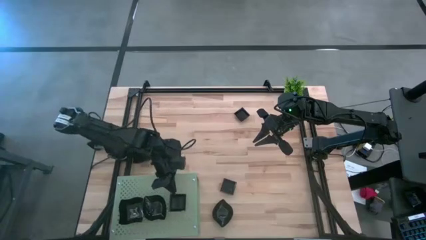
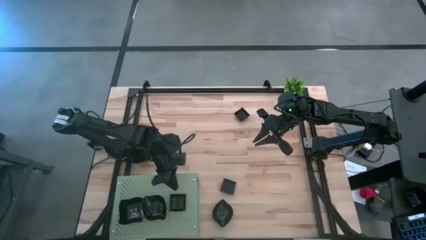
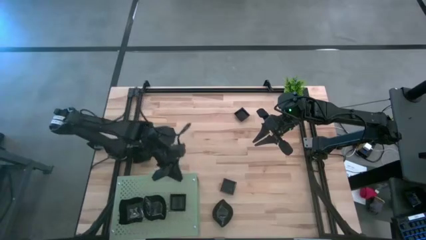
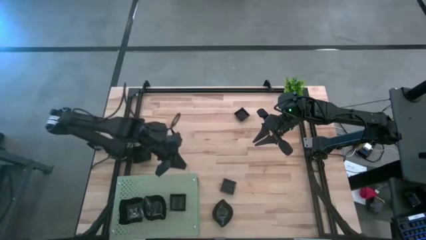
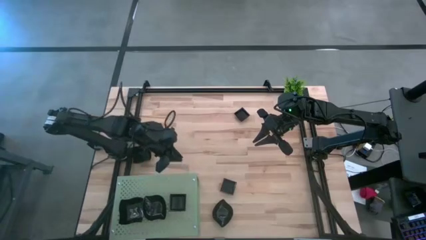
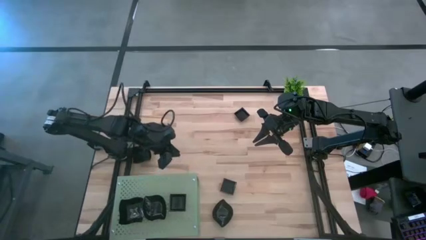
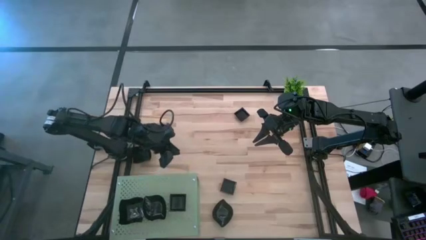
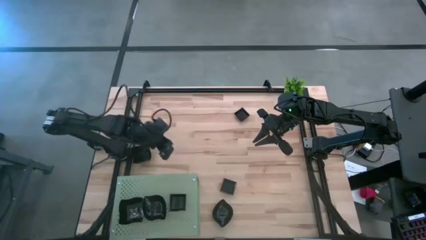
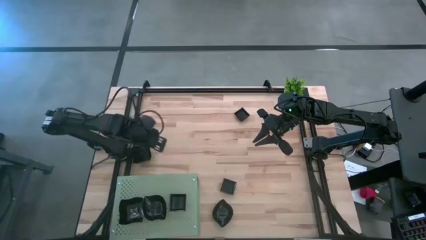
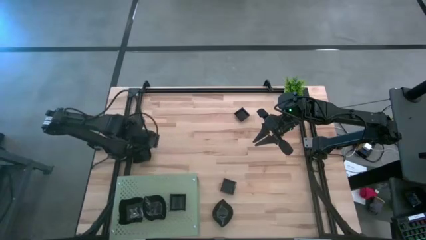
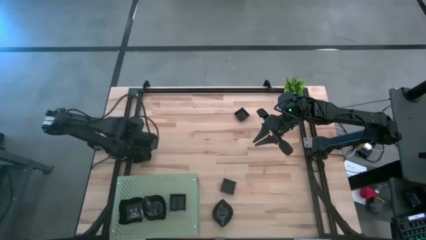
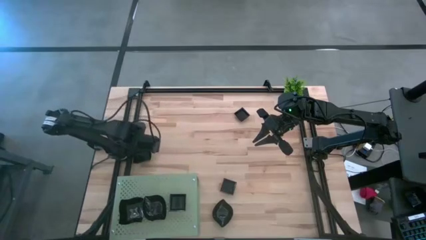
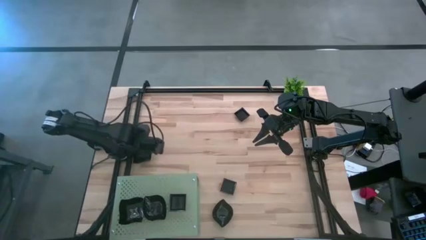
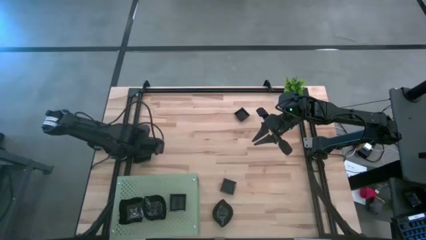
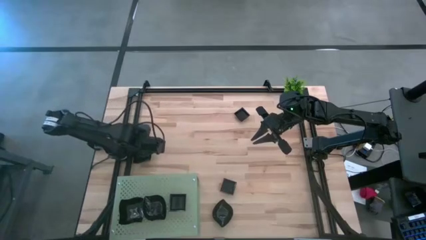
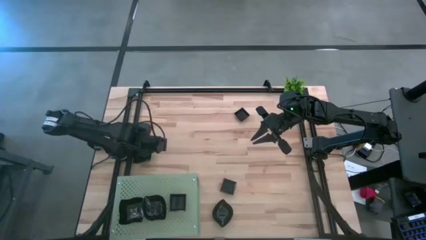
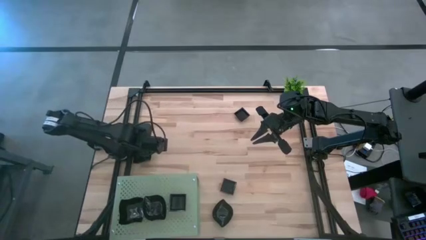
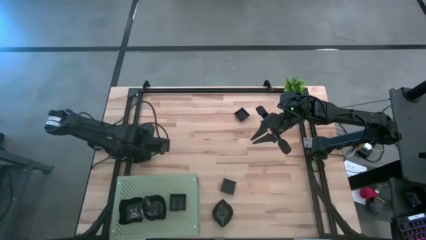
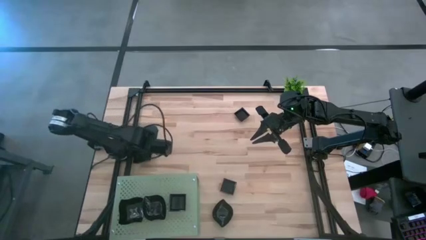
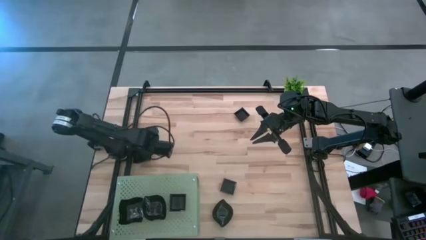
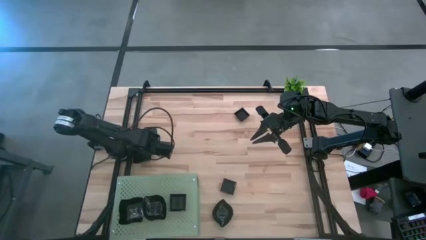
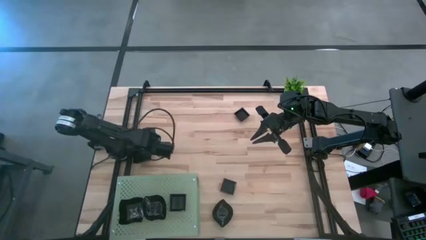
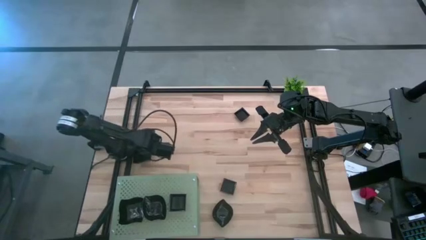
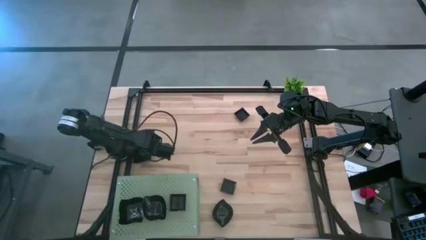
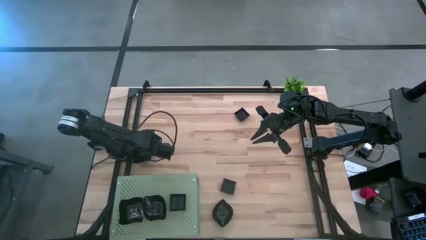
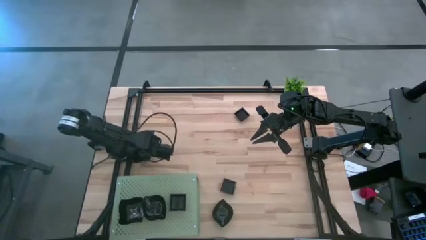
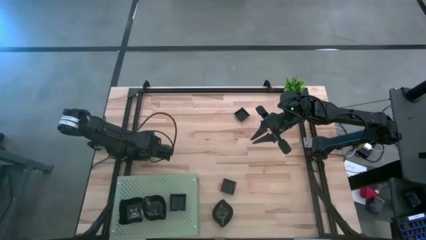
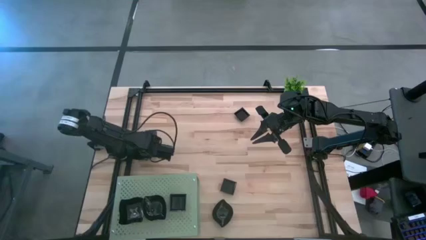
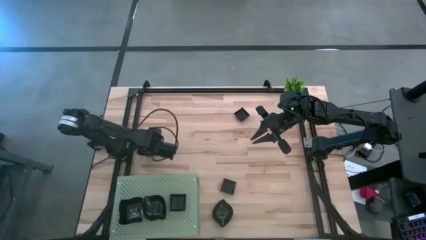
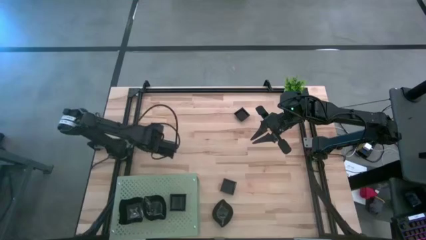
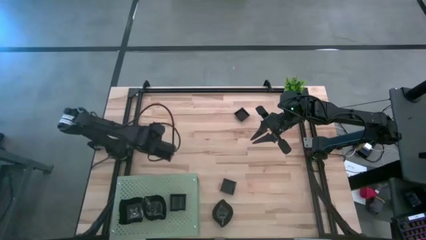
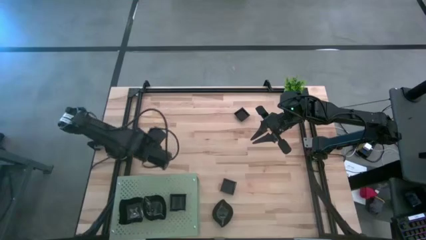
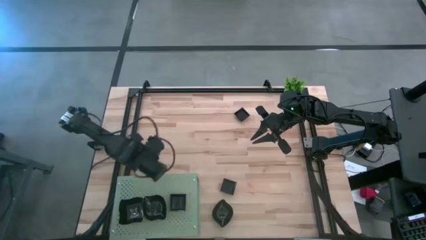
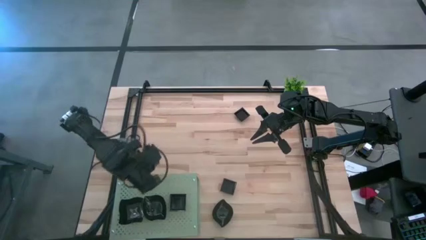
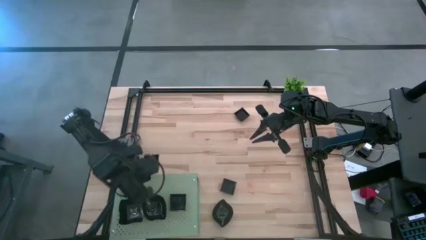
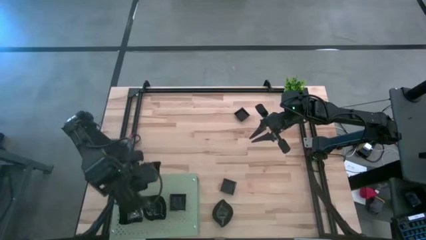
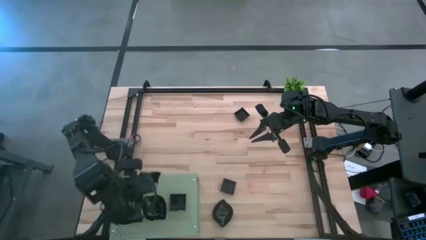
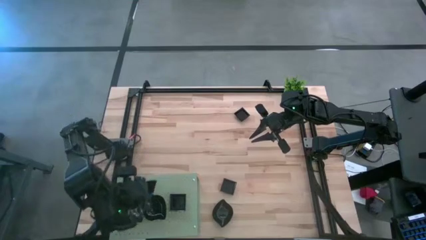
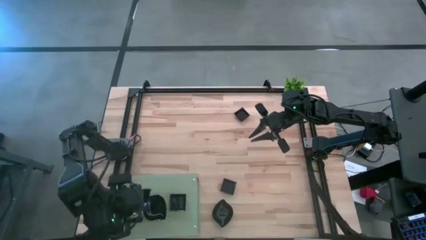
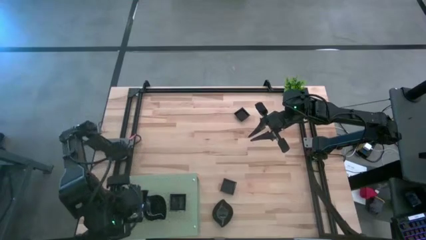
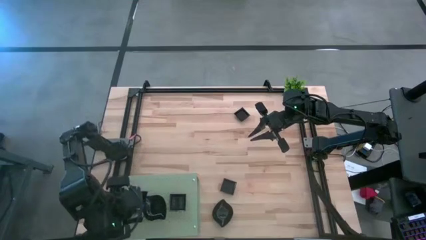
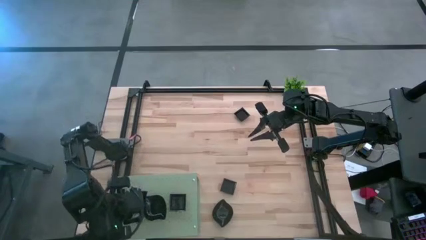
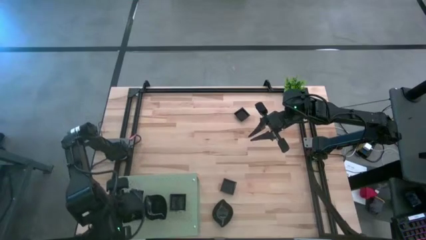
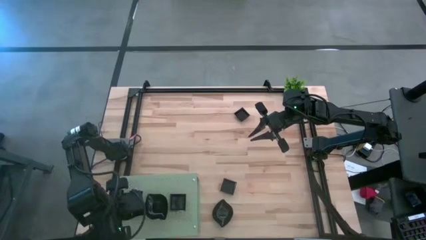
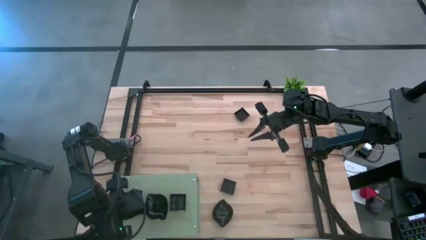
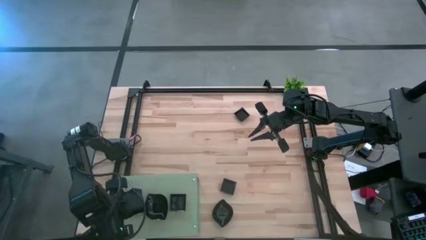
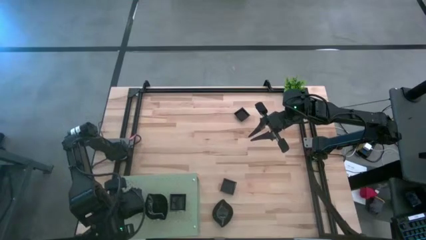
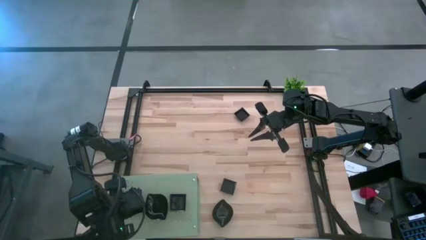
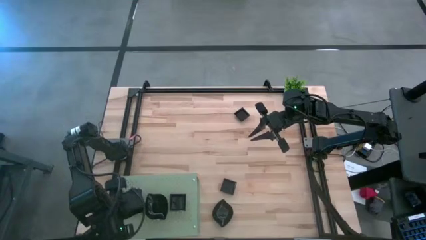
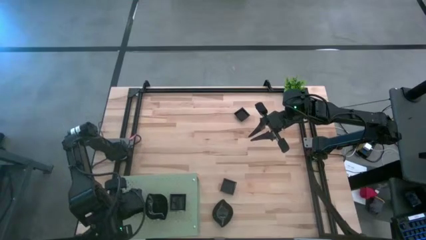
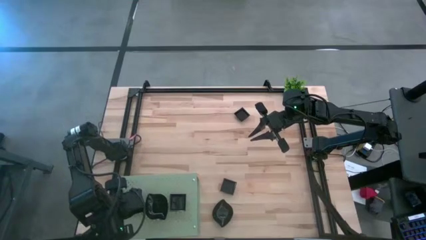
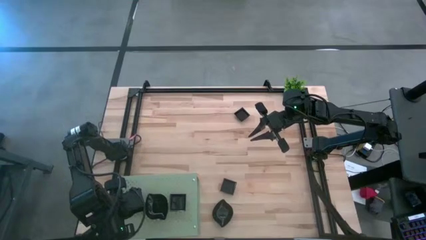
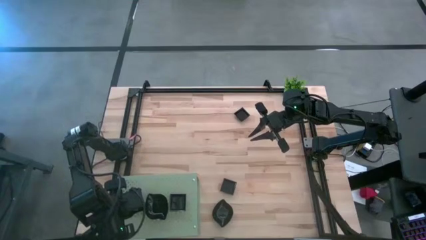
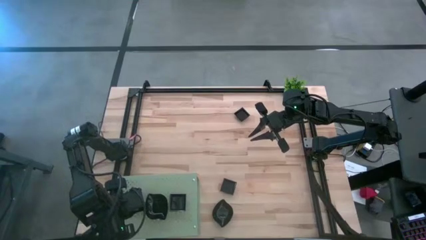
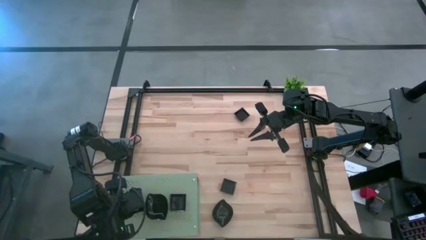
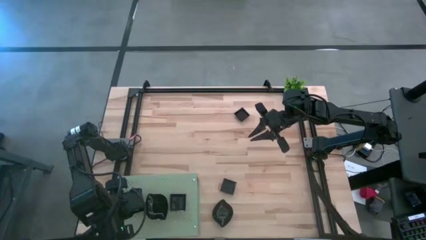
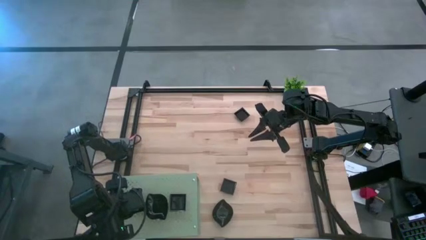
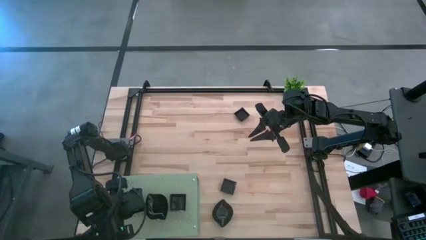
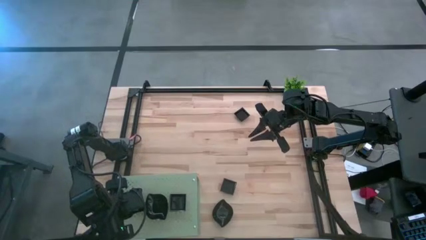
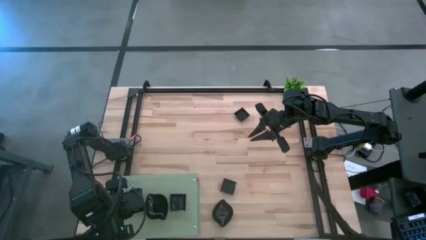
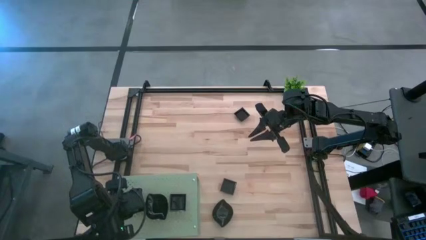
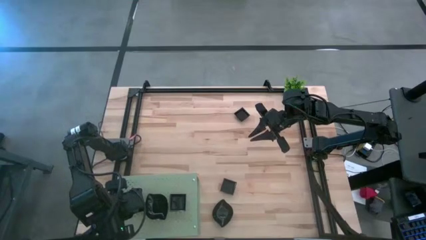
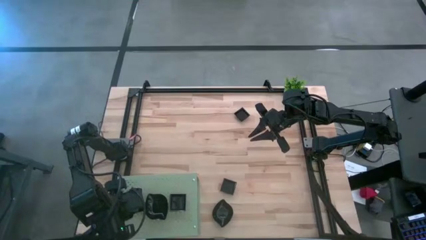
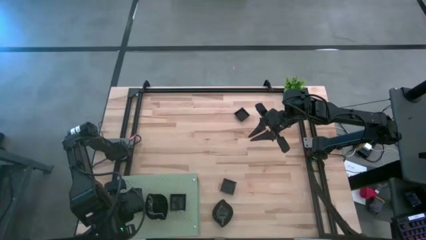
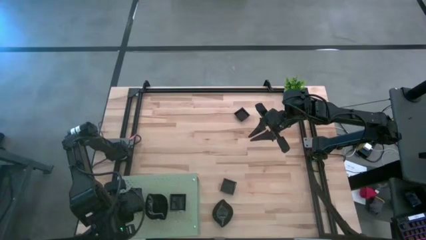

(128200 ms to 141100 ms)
Task: Pick & Place Mini shaped plates
Stack the black distorted square plate on top of the other black distorted square plate on the shelf

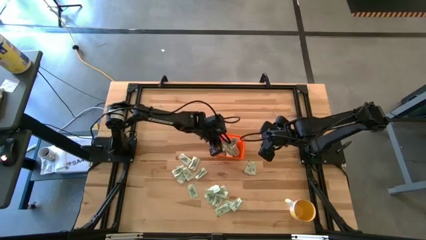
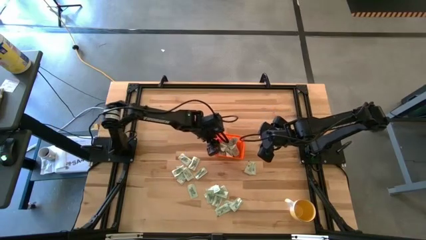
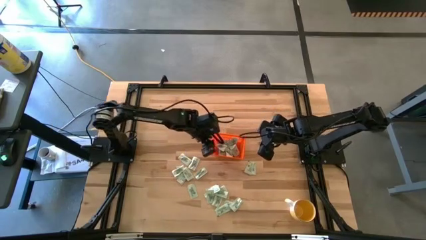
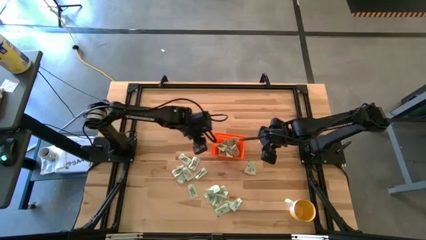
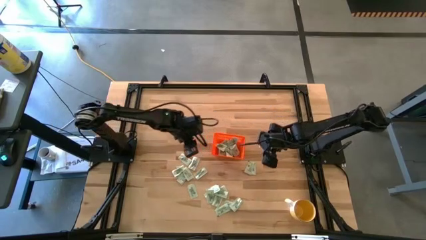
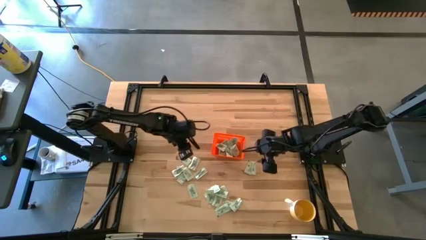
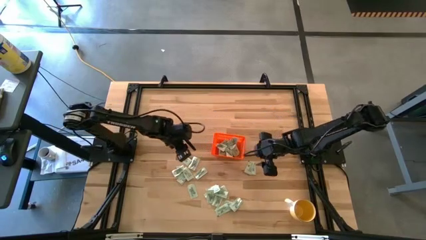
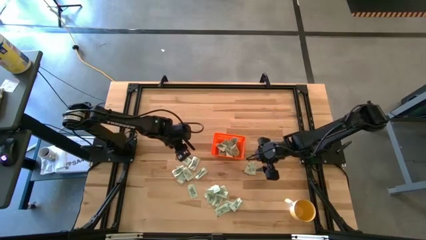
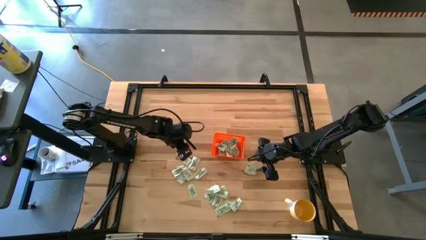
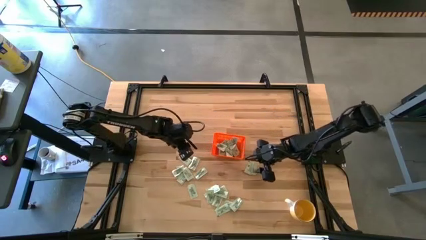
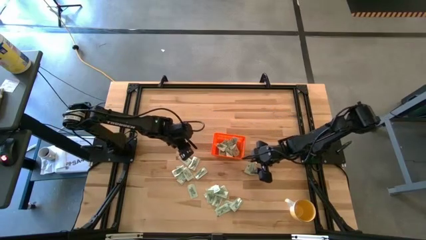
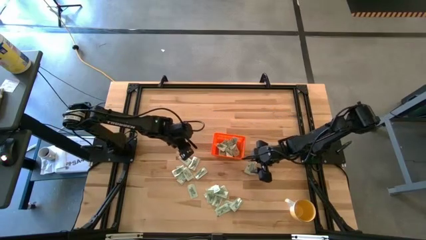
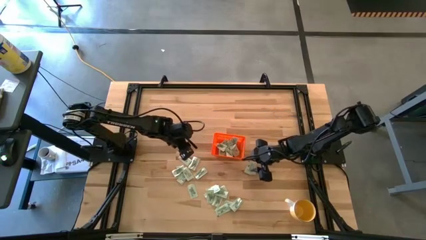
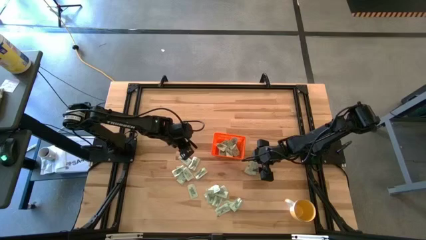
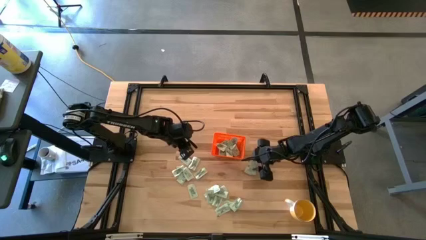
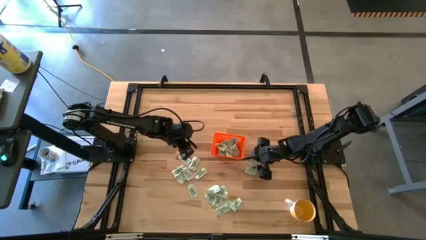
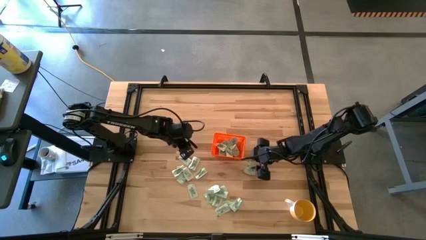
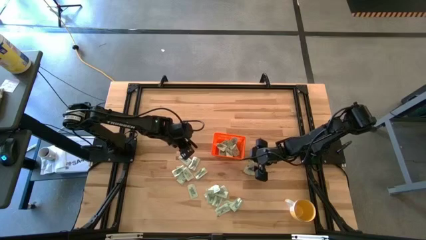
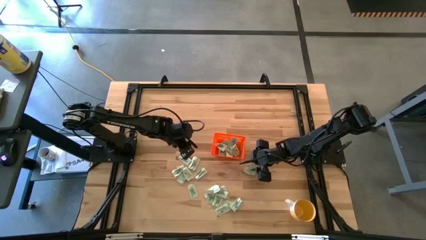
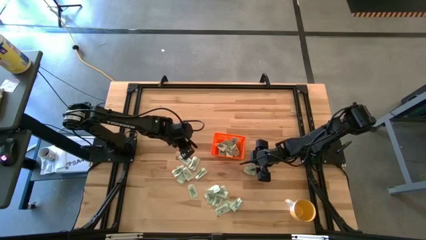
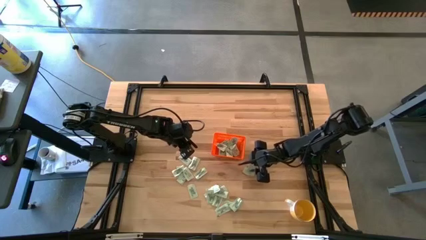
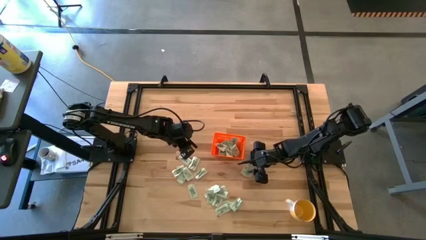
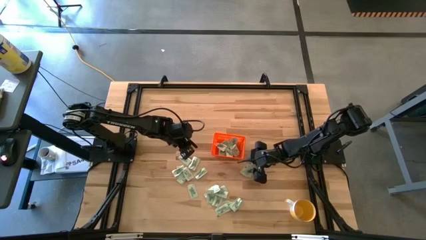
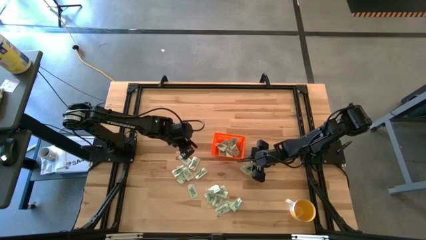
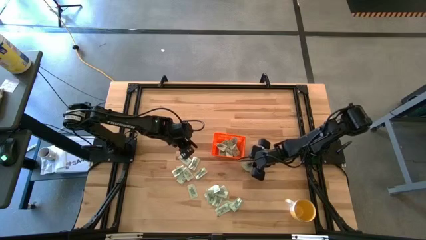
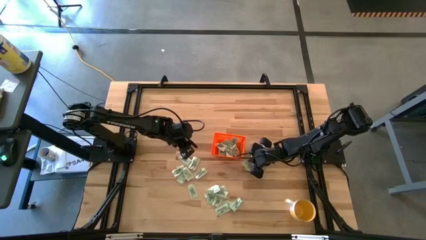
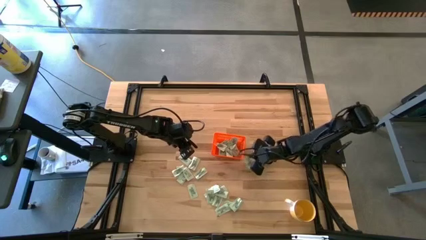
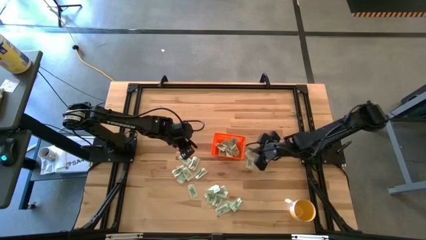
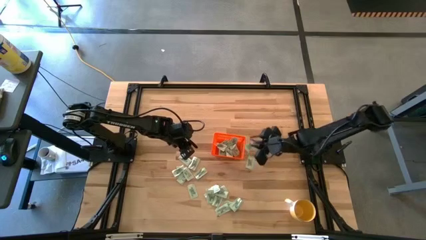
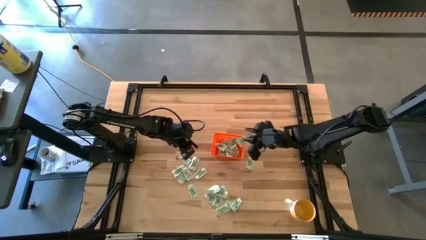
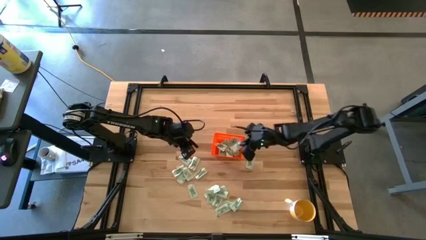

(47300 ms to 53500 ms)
Task: Pick and place Stevia / Truvia into bins
Put the white stevia packet into the orange bin
